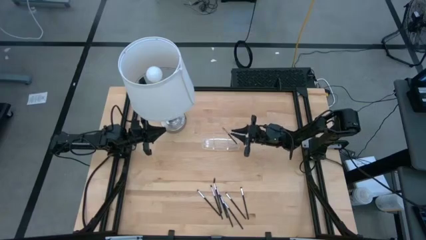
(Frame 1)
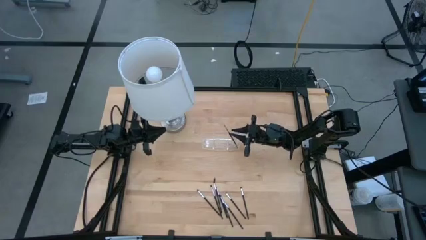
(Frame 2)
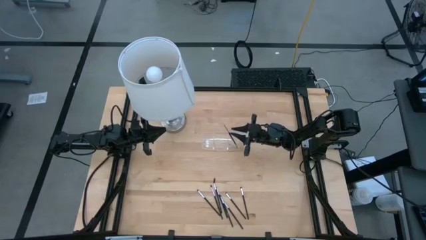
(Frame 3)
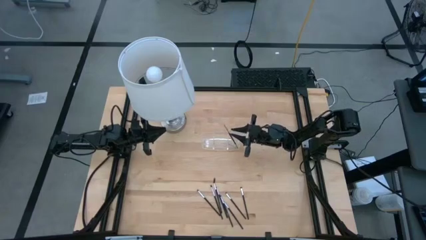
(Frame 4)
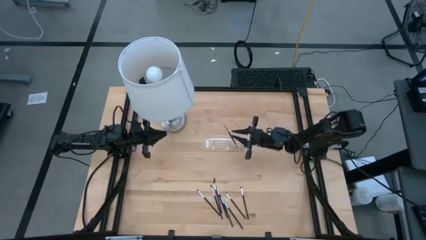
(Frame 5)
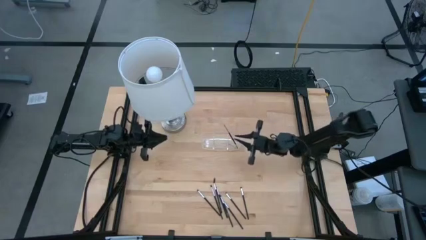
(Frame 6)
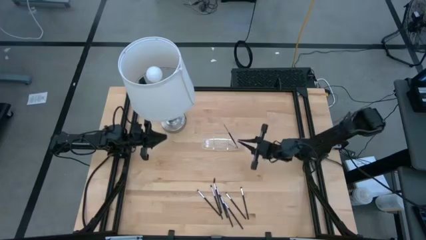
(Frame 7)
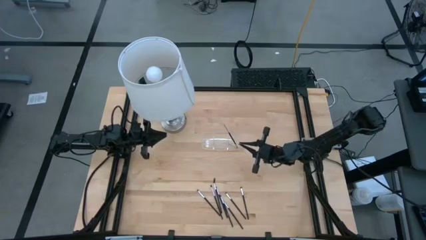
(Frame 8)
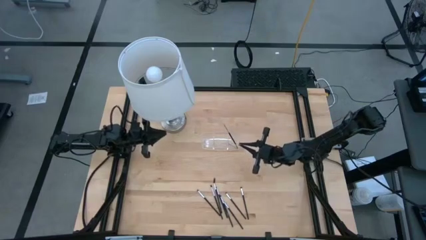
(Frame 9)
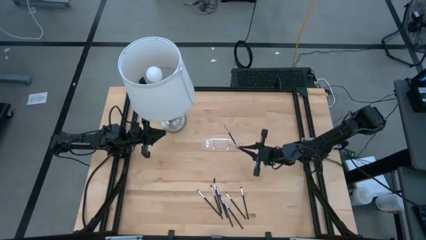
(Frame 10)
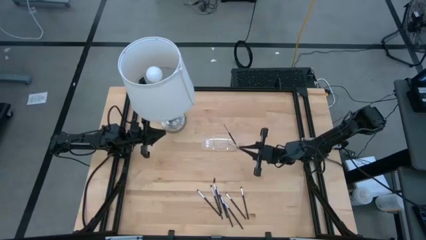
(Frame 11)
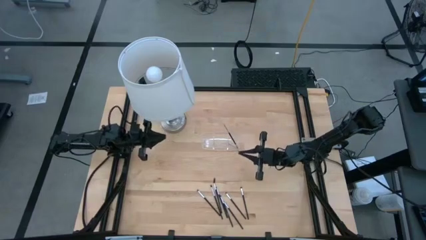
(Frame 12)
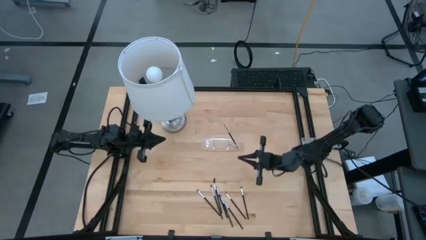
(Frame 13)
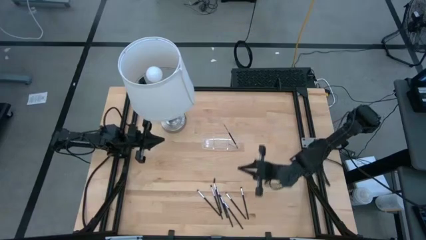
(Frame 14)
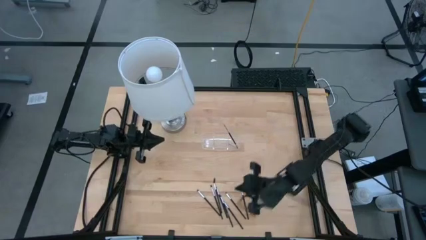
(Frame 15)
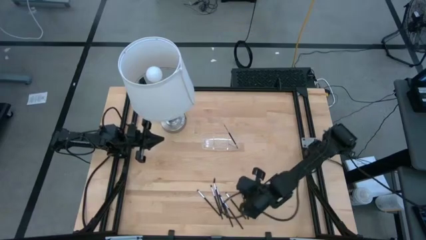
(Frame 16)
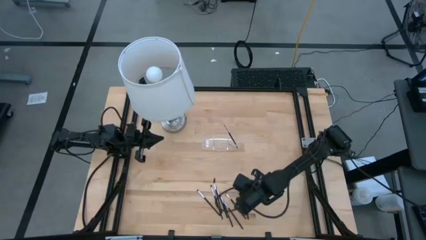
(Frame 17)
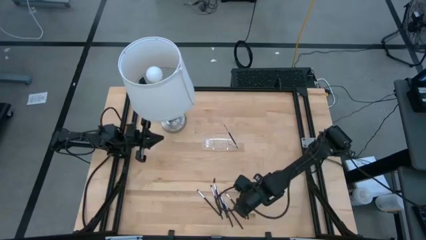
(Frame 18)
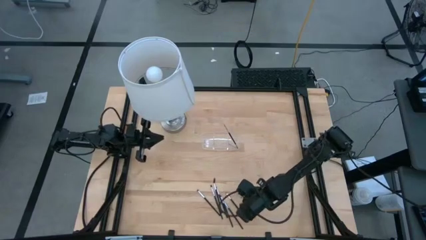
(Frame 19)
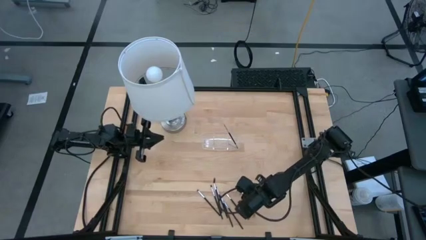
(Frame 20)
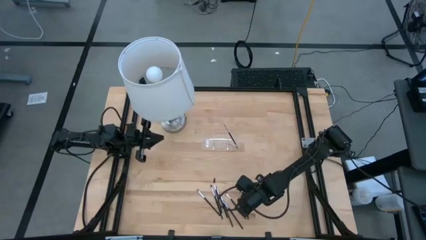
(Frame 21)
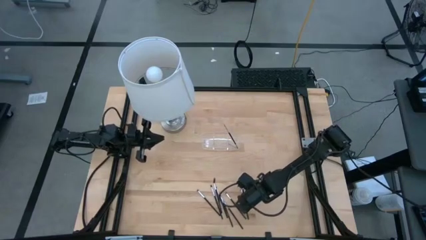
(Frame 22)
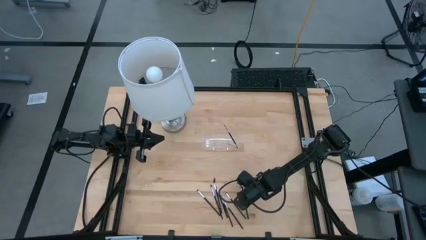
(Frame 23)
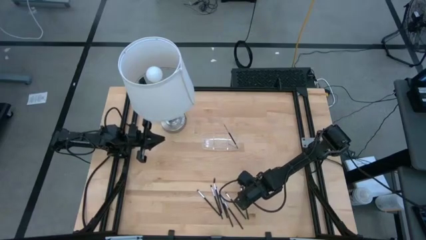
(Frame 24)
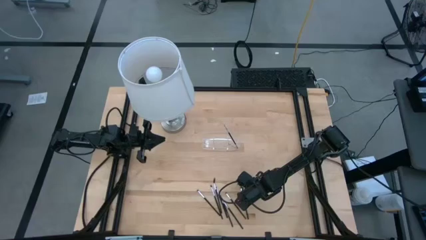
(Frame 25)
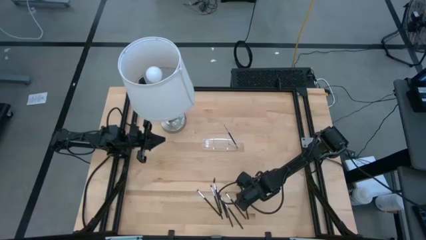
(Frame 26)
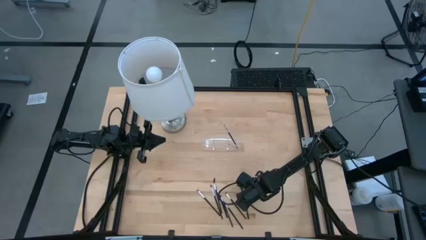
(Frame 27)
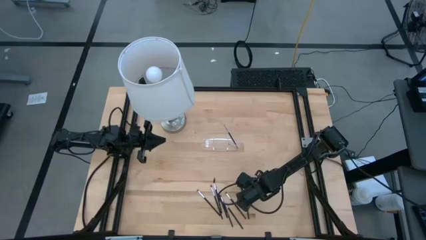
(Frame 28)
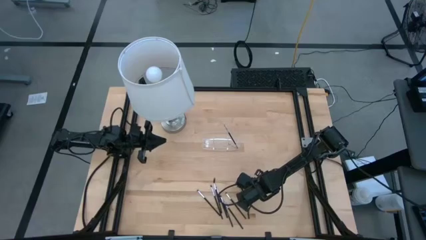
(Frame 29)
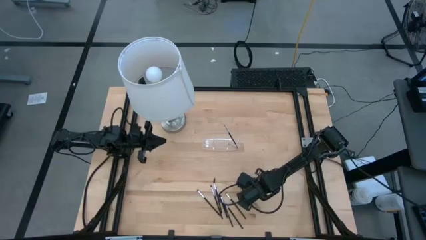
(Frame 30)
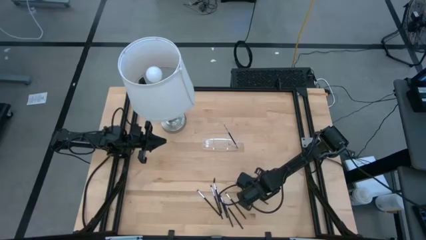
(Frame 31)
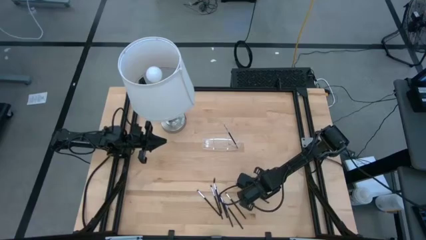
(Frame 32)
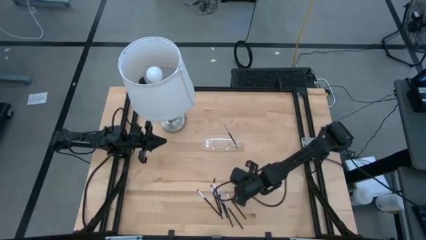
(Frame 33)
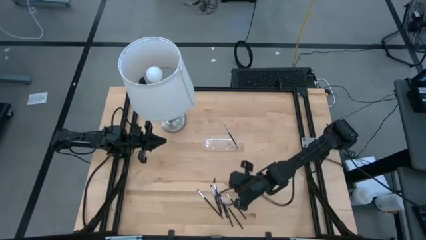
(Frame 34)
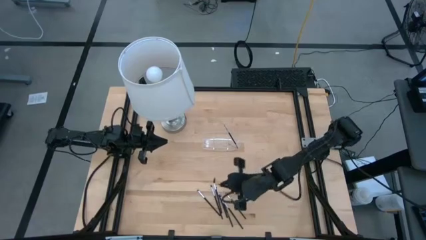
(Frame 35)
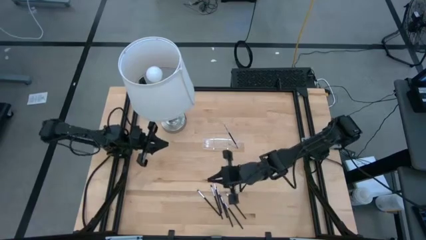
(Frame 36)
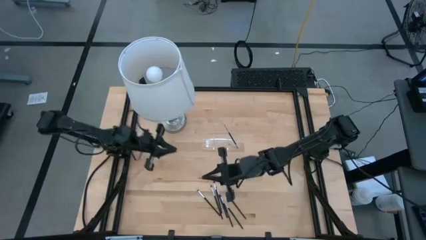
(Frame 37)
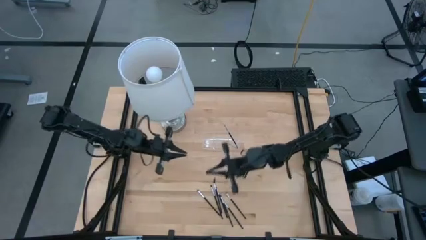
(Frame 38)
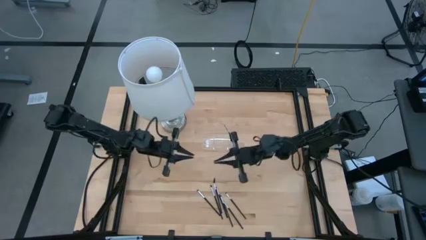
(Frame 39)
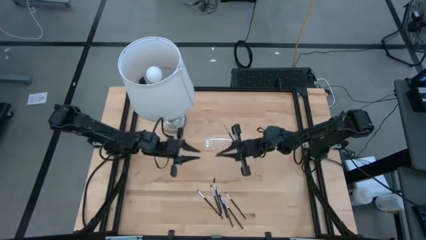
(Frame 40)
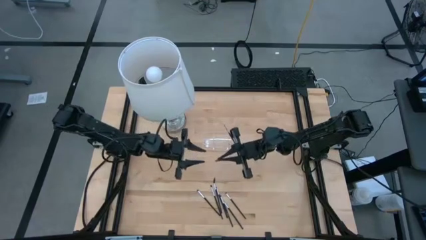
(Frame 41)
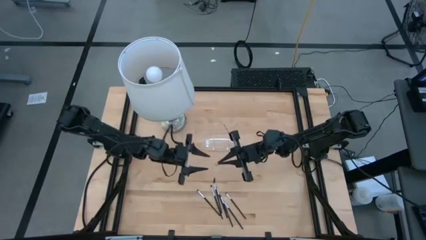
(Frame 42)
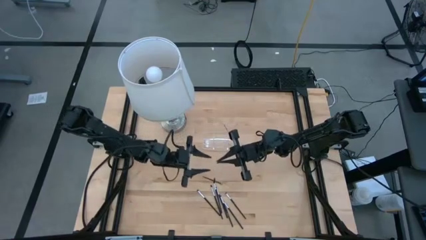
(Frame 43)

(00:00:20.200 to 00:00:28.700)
Task: Sort items
Put the eyeshadow brush into the transparent organizer

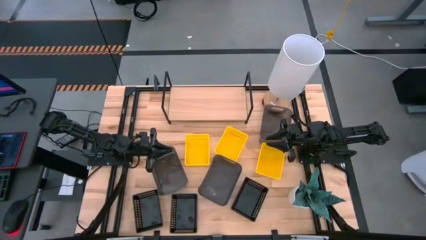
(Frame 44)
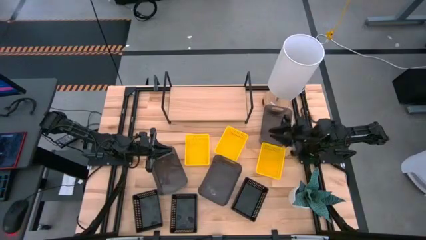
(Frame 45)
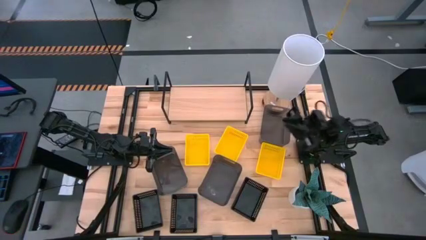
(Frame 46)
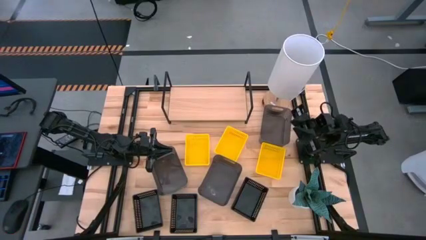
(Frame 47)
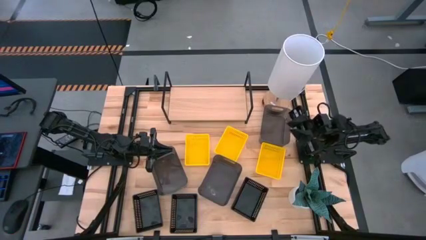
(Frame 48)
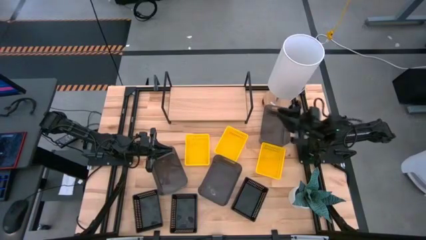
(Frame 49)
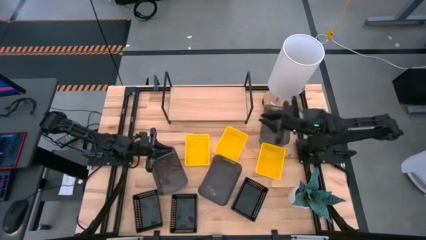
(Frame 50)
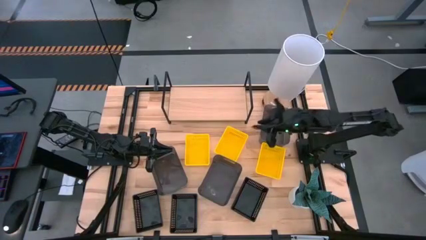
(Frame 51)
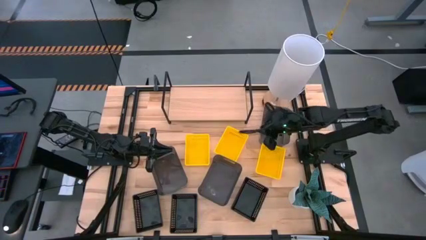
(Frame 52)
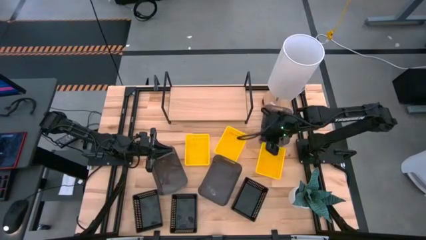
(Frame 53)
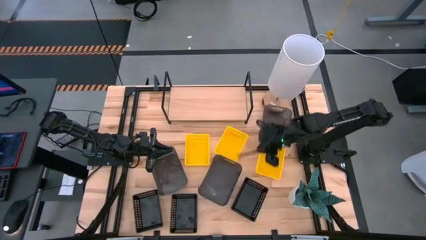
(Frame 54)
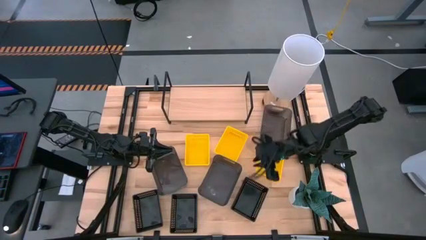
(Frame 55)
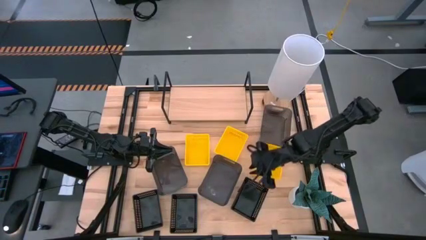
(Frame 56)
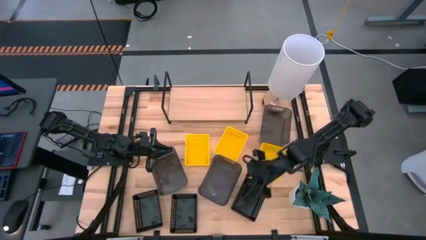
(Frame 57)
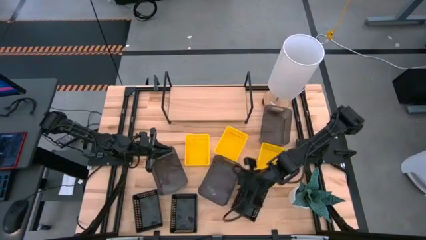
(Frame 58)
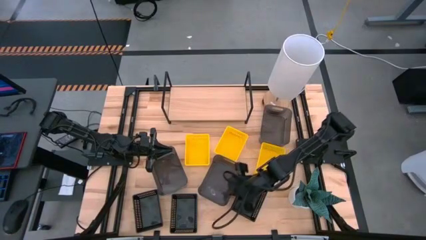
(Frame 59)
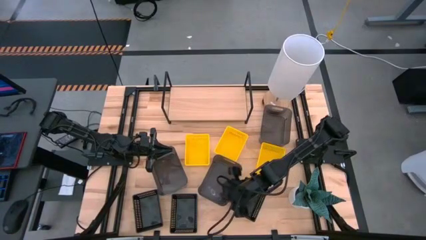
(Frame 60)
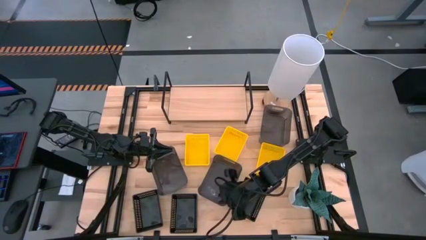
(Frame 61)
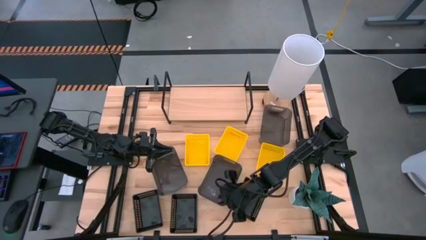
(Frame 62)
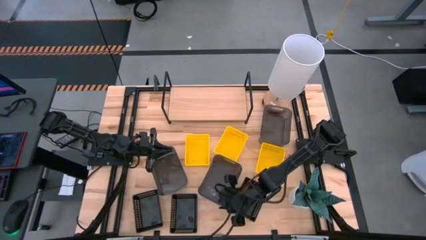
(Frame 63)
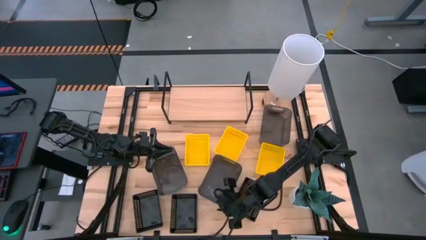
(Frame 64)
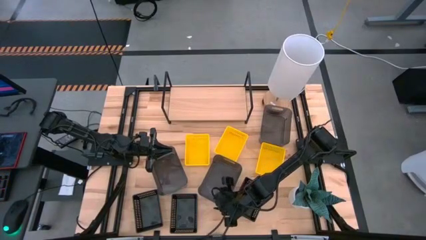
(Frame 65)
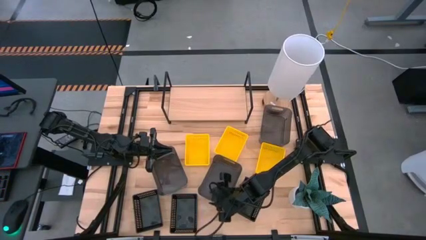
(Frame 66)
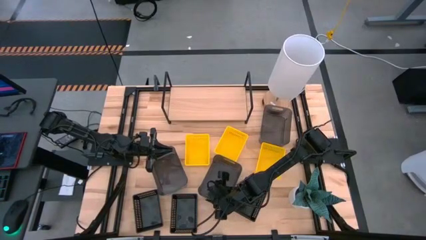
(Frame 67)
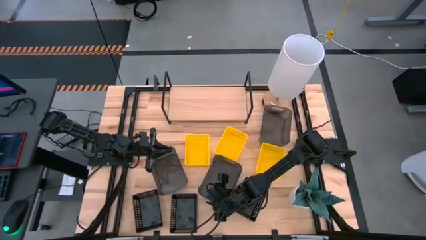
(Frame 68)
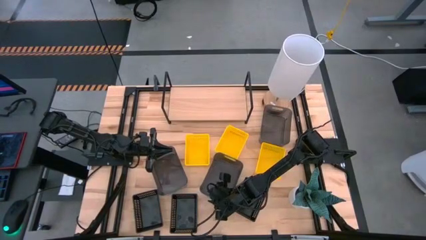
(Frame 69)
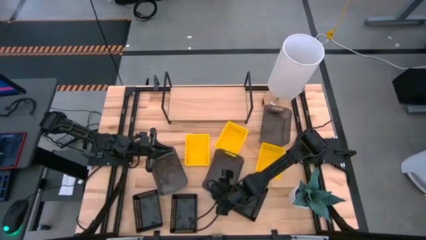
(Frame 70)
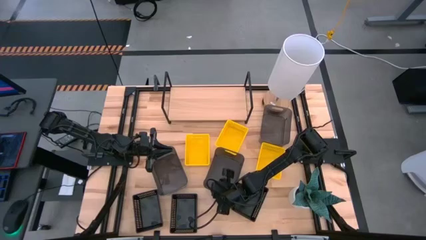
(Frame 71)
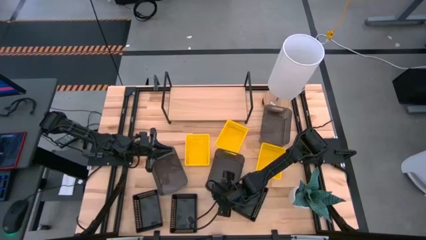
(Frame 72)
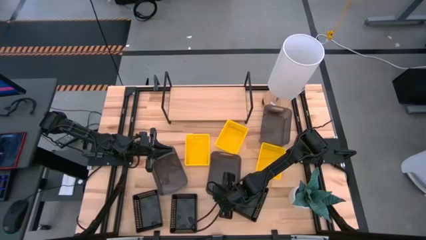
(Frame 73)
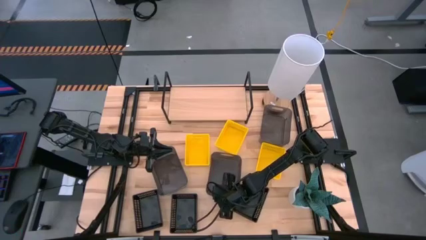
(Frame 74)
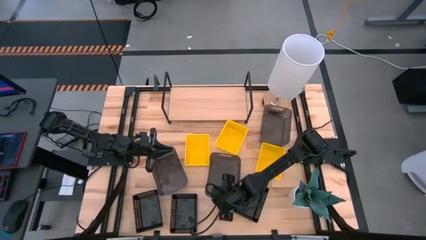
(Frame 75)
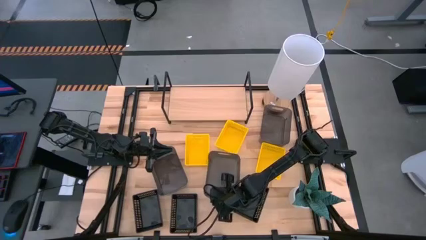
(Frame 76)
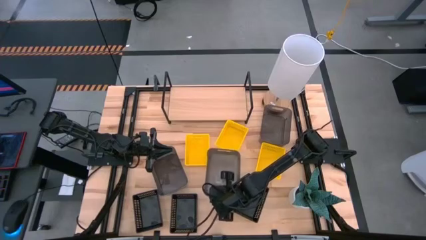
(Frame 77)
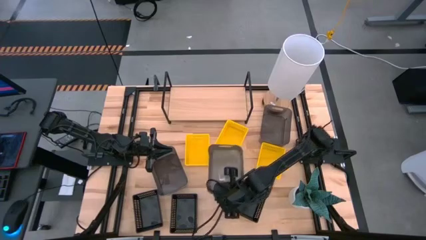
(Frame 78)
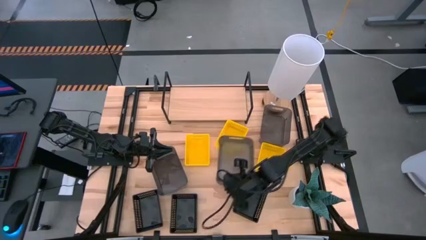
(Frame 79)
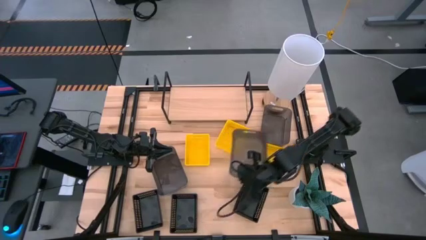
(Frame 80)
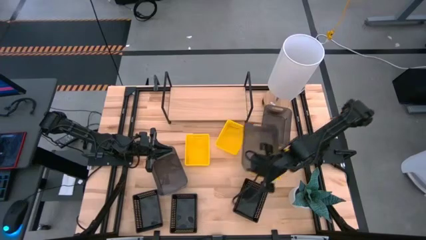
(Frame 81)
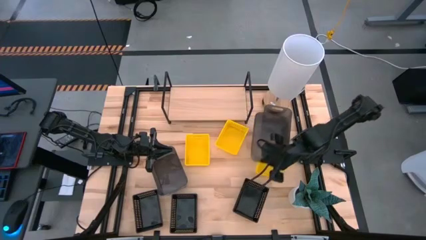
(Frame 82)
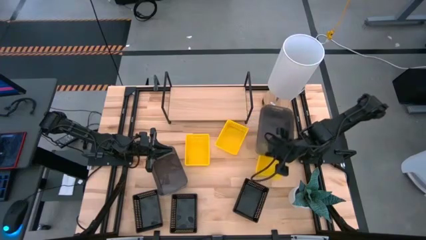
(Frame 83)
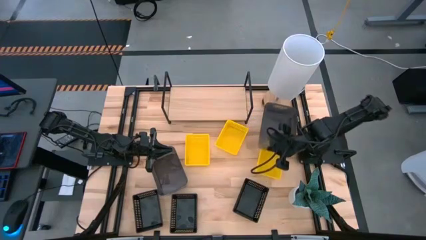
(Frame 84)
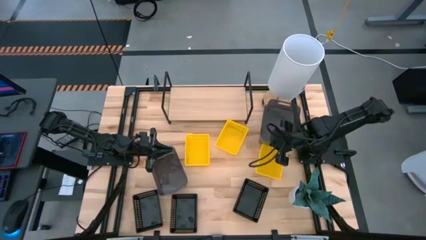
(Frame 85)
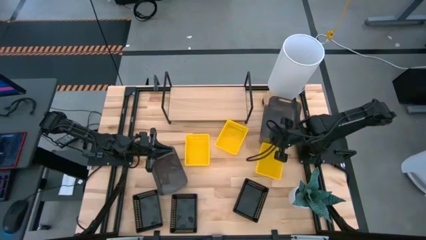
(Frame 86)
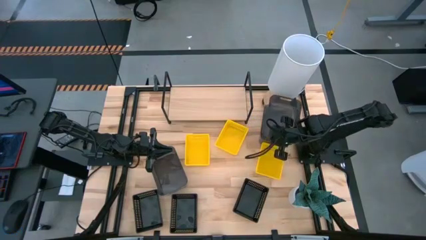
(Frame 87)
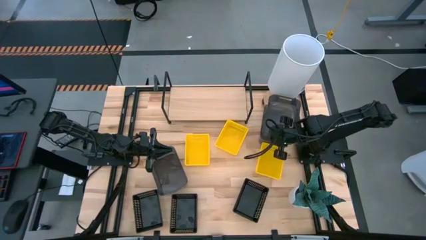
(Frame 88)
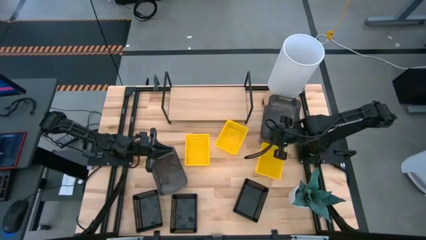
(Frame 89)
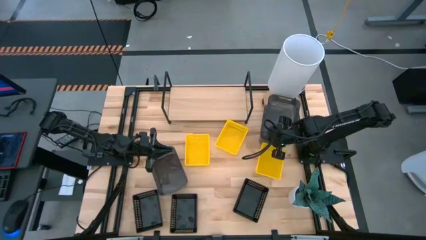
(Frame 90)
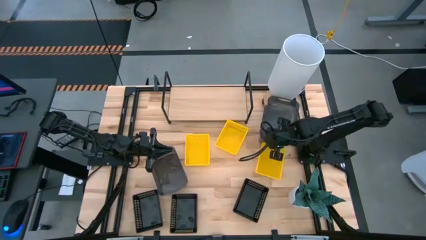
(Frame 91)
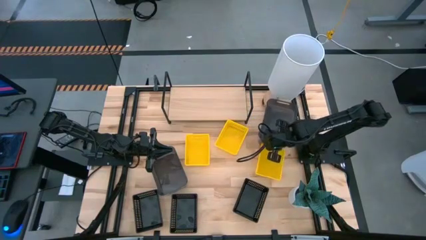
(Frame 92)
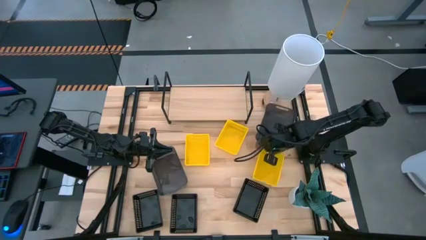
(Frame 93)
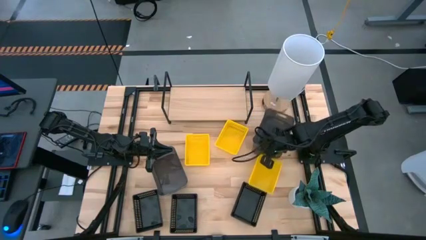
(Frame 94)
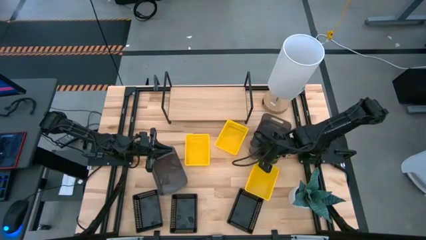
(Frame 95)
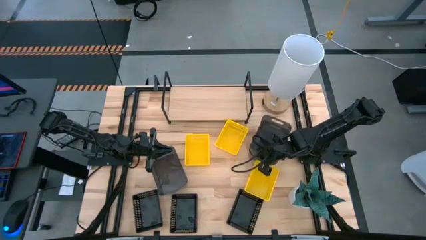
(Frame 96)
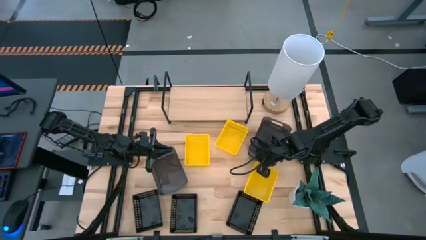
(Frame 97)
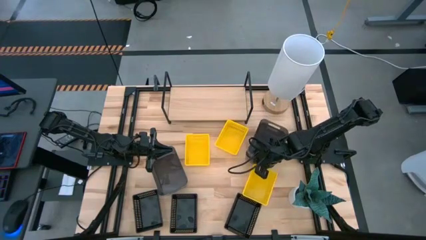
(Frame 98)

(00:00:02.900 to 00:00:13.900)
Task: Stack baskets on shelf by color
Stack the bottom right black bin on the top right black bin
